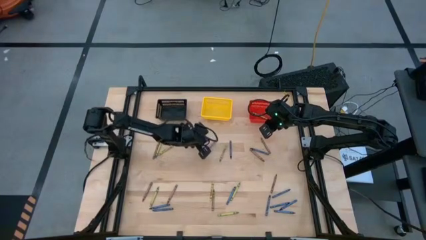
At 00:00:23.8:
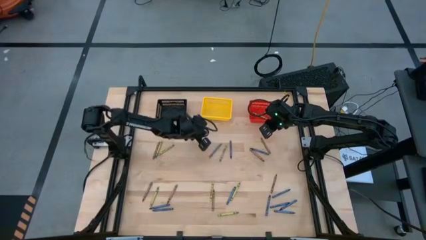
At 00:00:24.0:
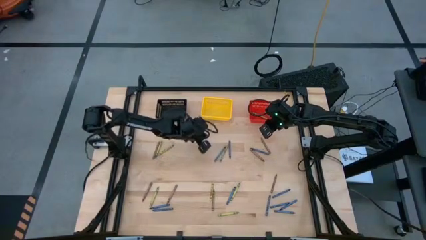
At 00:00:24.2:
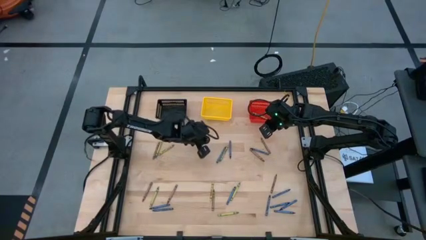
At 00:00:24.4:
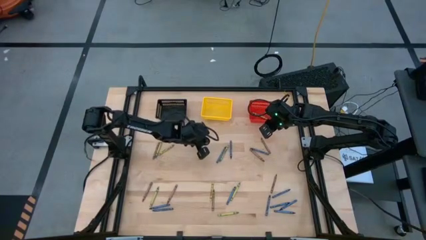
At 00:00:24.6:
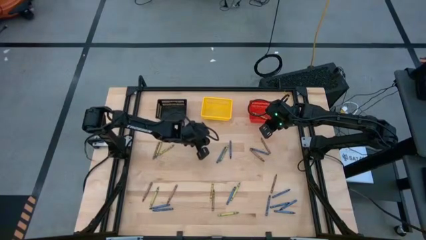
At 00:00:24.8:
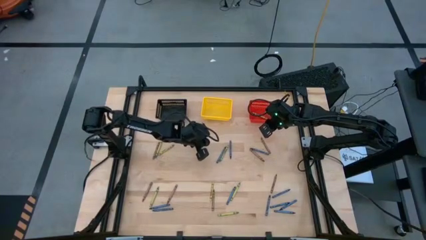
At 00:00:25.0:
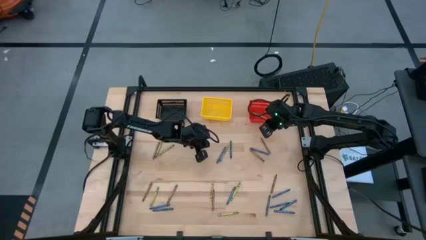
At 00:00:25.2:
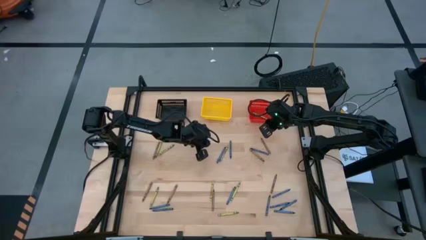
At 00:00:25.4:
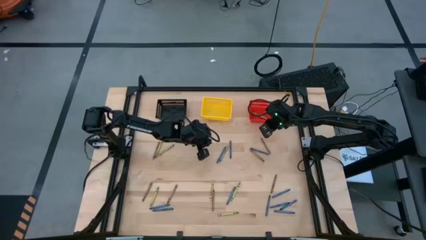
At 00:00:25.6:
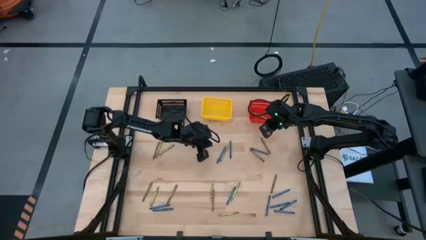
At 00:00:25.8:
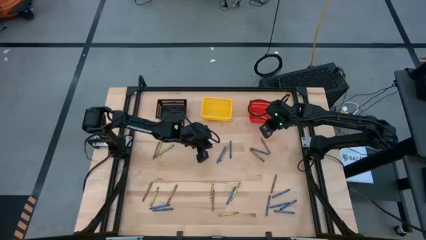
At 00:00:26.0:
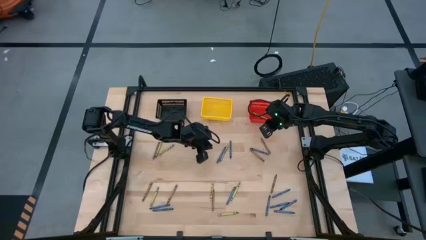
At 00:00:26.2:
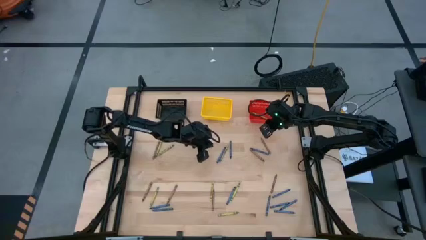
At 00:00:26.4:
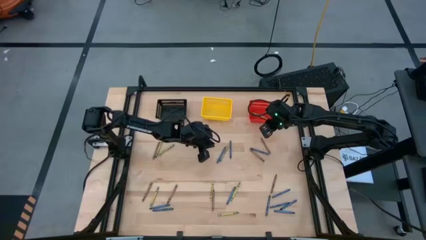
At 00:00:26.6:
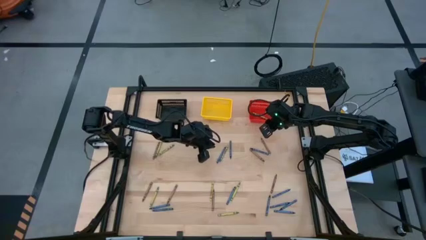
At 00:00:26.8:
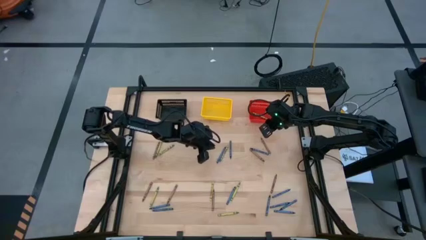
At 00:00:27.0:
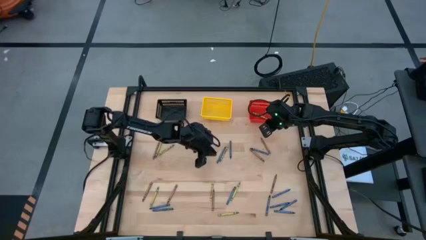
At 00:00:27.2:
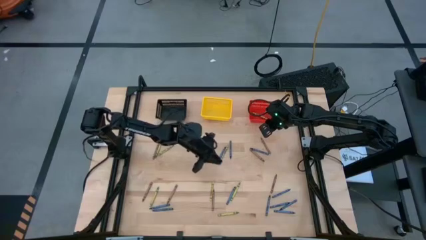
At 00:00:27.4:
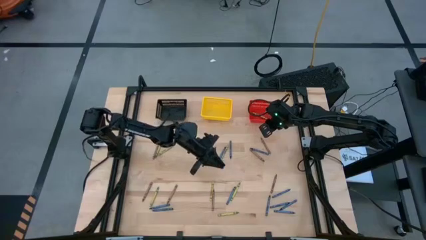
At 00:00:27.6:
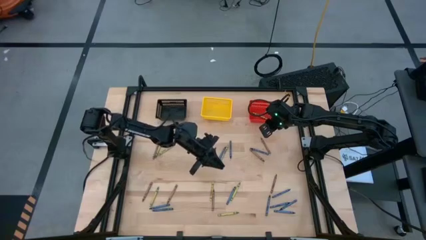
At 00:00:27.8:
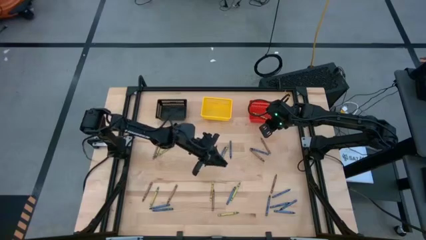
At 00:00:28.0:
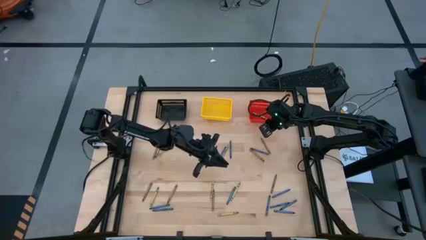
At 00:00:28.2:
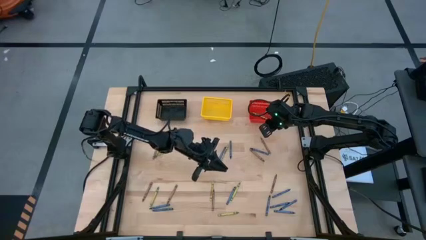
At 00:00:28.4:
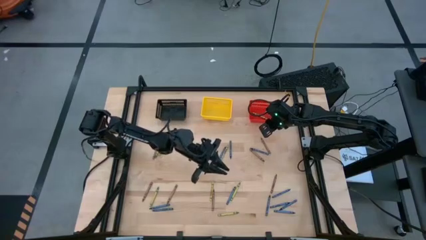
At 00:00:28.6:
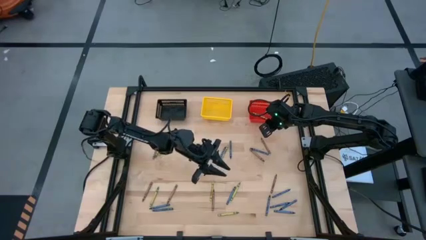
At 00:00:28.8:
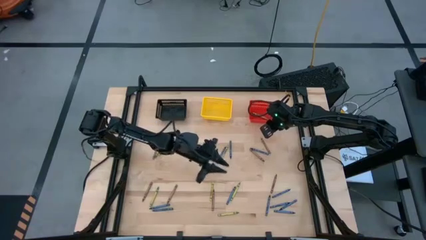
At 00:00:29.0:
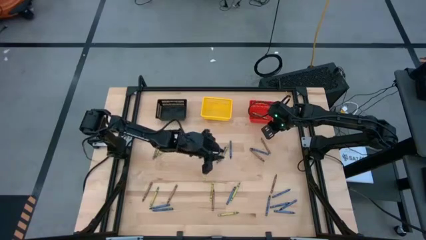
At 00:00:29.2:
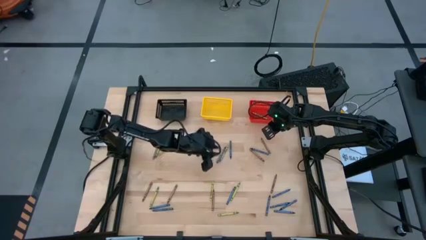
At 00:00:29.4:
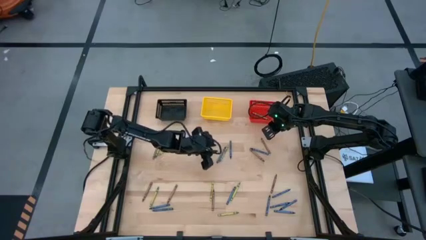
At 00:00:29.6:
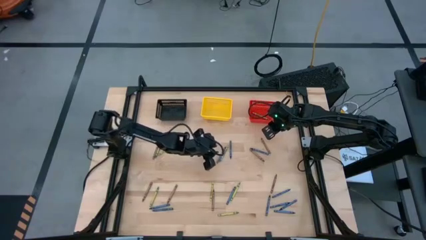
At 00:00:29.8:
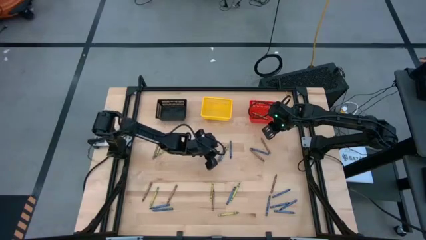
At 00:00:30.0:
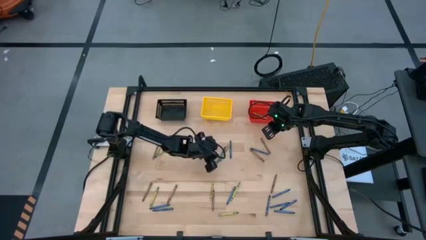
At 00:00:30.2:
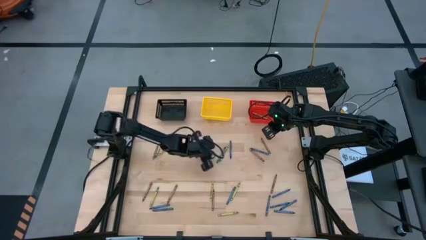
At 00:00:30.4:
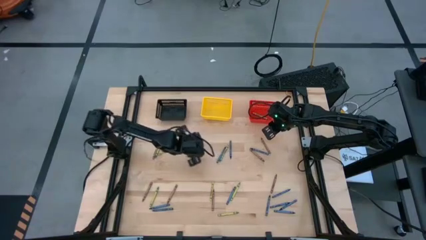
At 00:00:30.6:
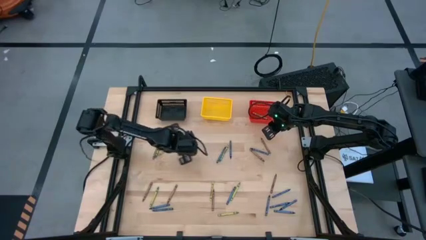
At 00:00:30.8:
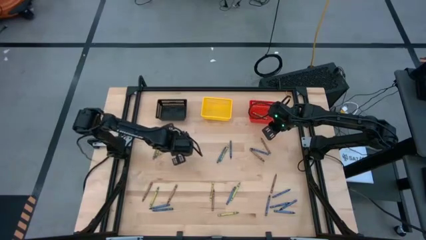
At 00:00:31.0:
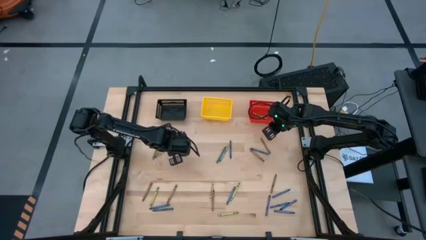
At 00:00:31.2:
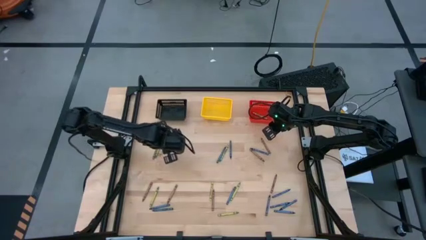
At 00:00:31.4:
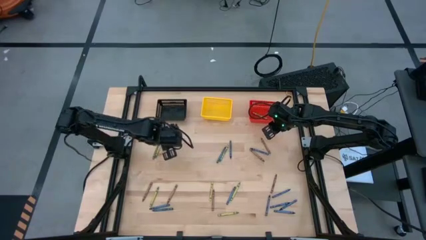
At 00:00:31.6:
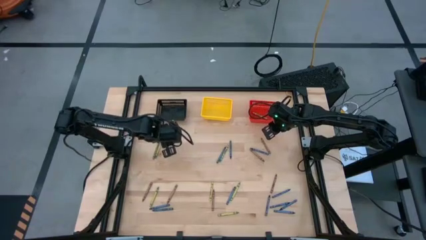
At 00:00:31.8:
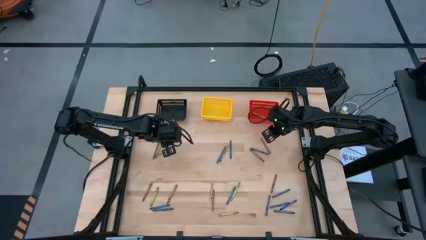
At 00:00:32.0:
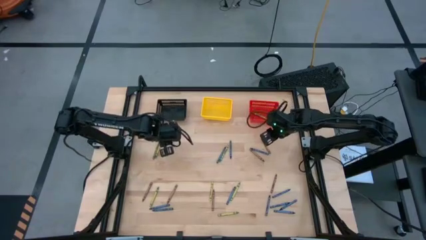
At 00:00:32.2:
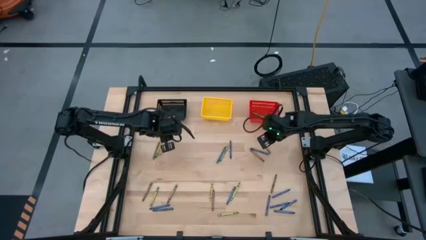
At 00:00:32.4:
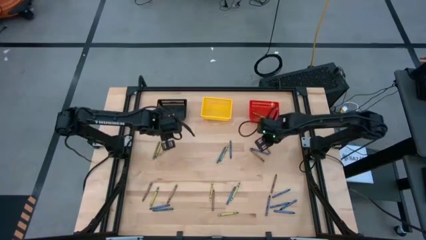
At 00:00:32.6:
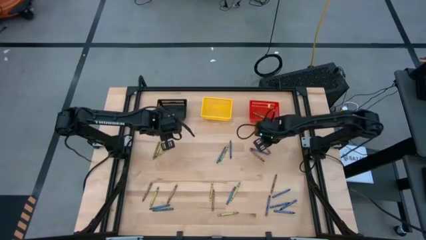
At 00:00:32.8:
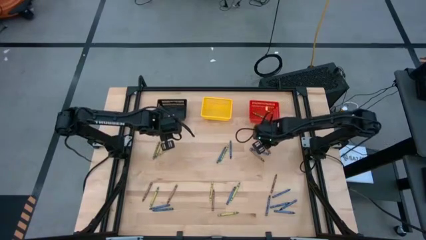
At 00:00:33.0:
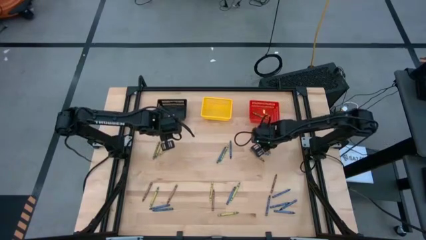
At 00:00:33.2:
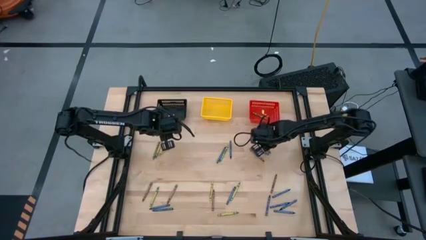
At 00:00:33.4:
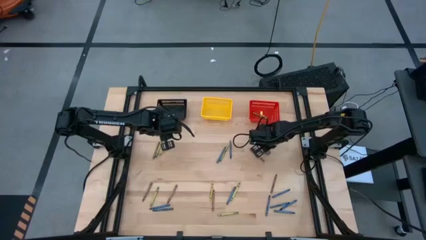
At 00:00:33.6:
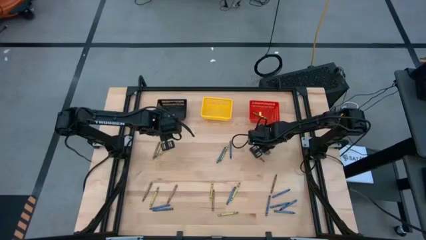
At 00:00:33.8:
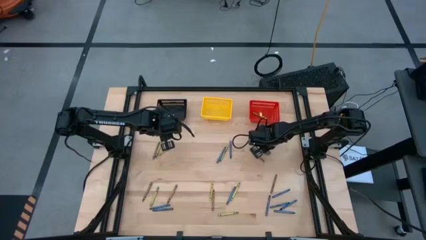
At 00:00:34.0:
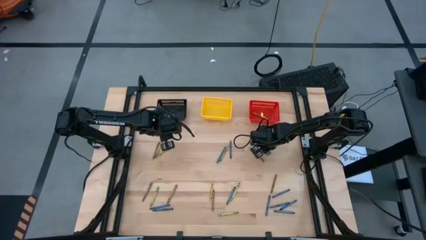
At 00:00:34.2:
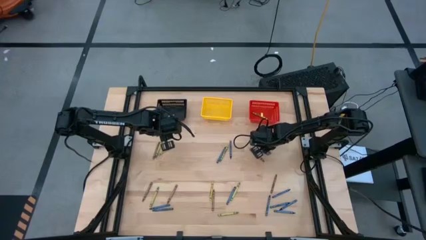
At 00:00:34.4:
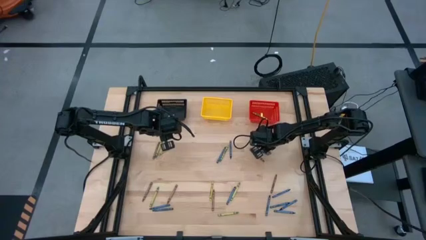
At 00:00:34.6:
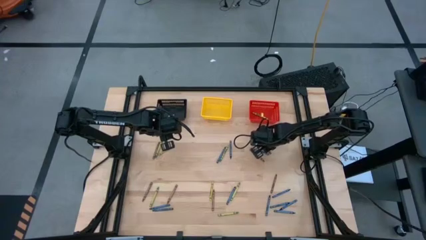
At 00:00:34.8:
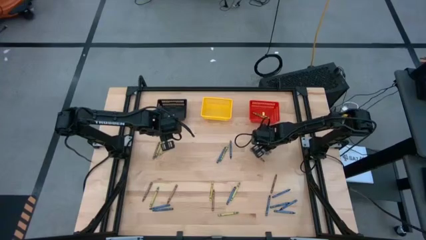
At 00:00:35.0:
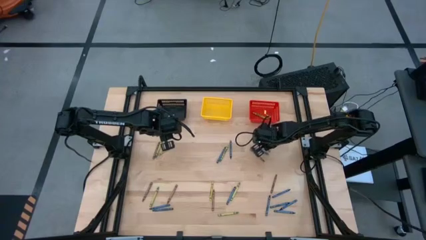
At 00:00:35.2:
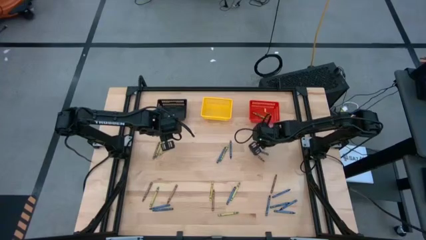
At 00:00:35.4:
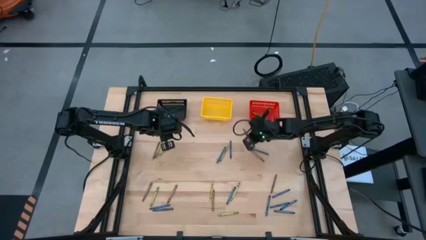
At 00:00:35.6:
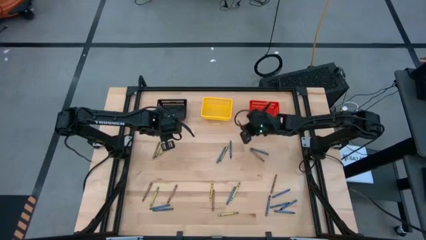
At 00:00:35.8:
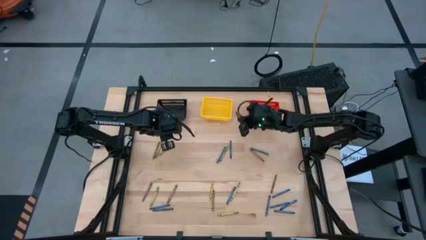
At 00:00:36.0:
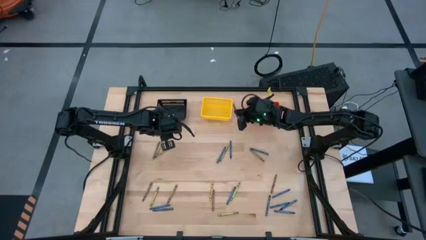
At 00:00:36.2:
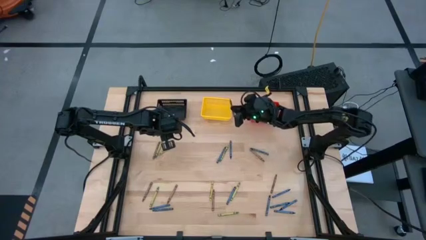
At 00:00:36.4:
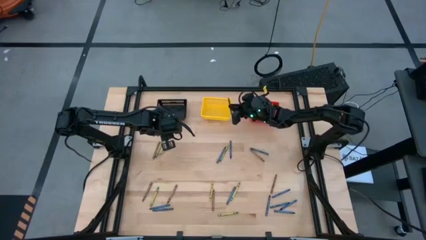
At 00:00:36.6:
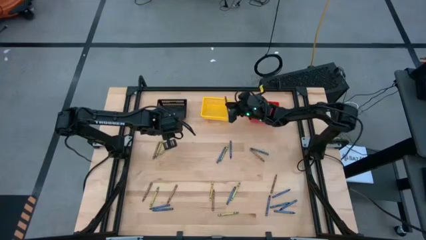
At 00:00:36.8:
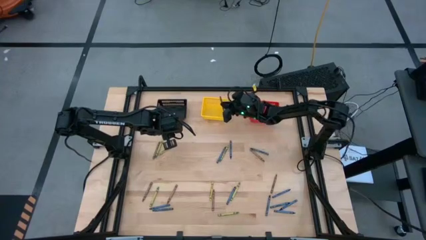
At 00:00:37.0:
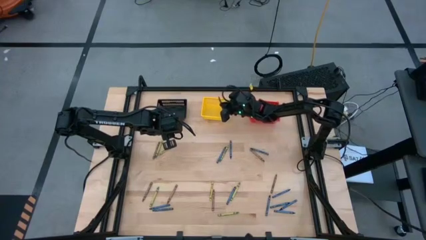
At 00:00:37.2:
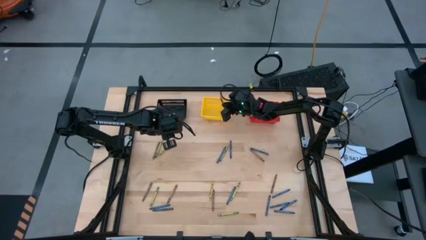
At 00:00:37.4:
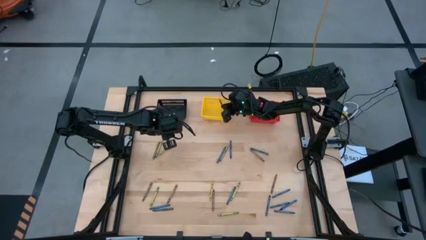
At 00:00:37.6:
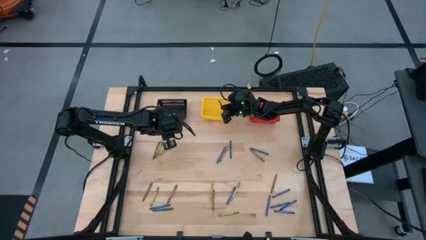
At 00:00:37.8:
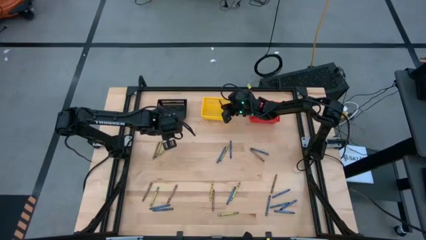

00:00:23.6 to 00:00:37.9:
Task: Sort crayons
Put the brown crayon into the yellow bin
